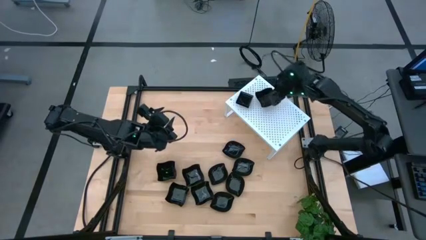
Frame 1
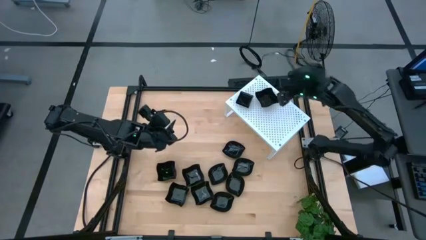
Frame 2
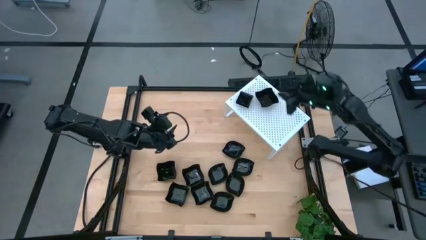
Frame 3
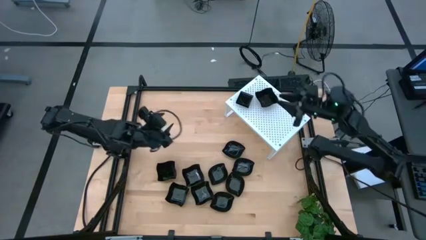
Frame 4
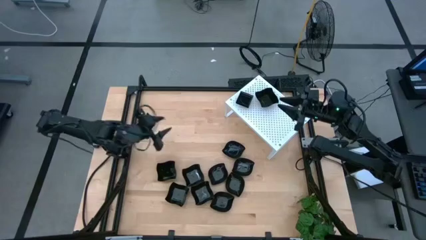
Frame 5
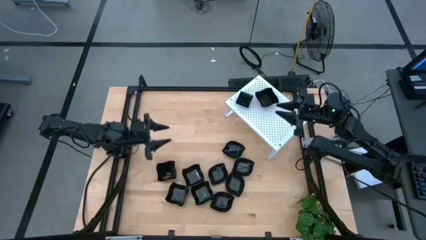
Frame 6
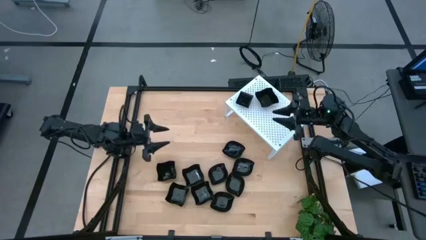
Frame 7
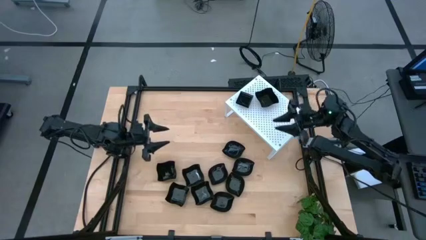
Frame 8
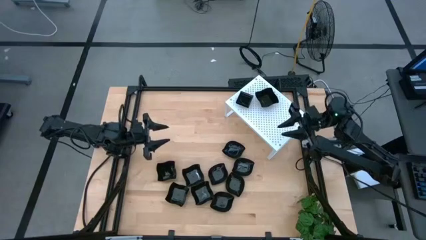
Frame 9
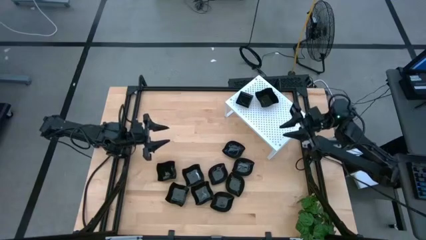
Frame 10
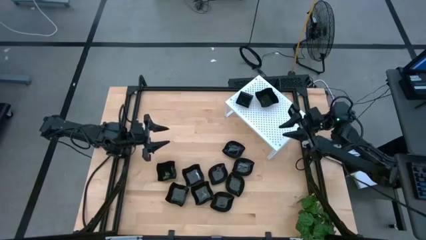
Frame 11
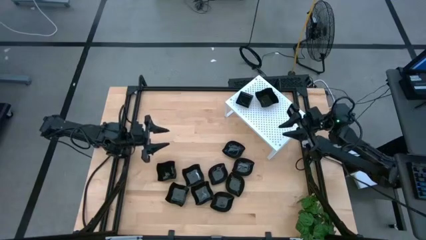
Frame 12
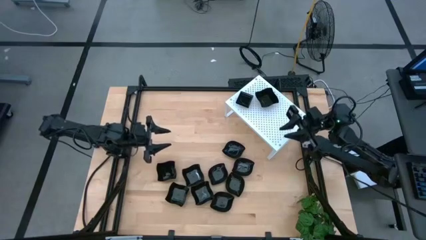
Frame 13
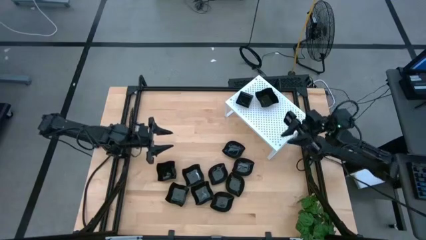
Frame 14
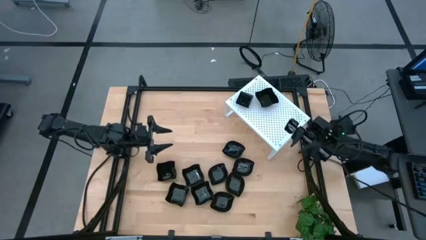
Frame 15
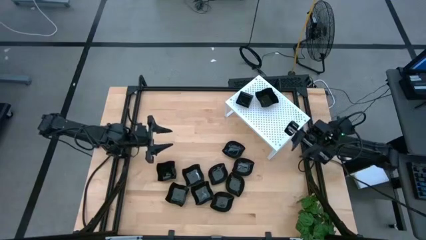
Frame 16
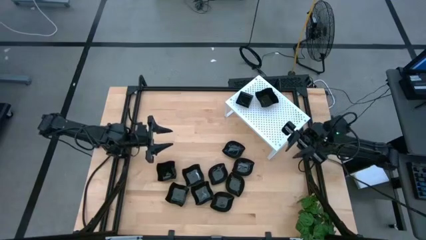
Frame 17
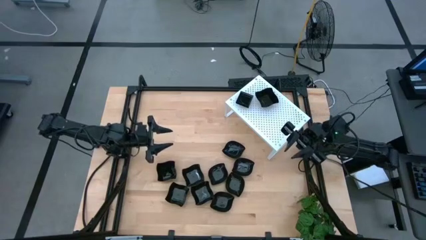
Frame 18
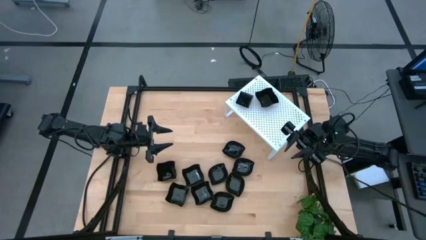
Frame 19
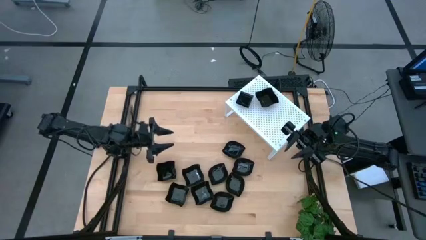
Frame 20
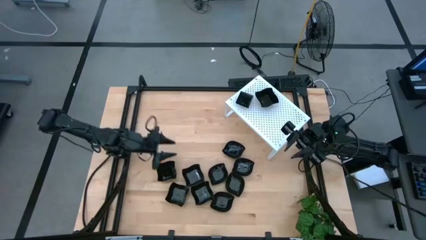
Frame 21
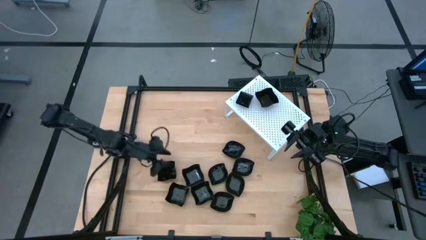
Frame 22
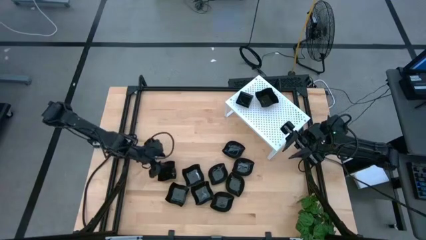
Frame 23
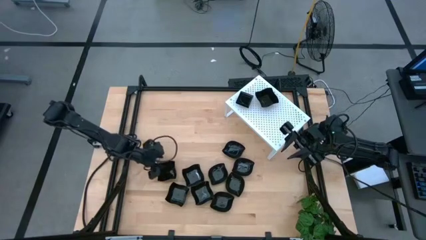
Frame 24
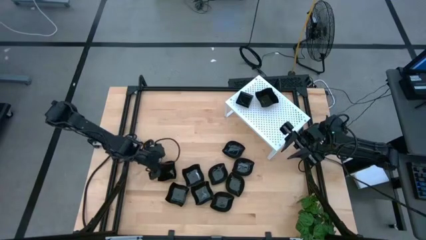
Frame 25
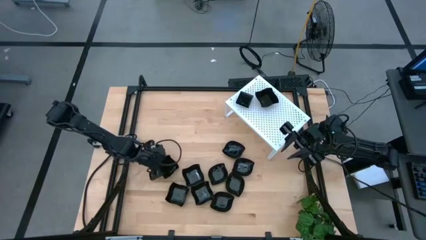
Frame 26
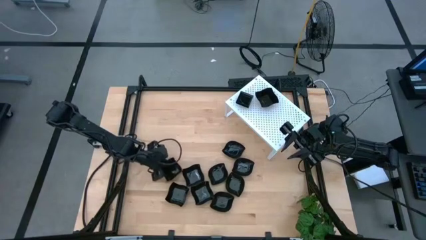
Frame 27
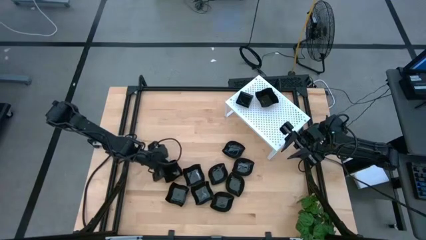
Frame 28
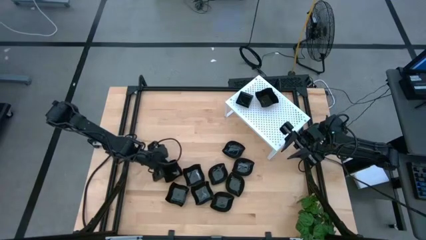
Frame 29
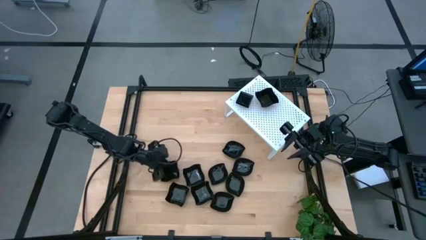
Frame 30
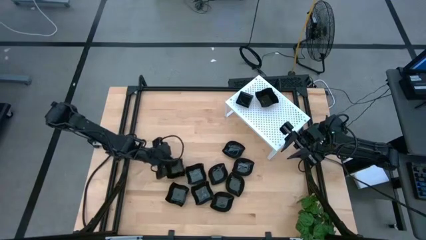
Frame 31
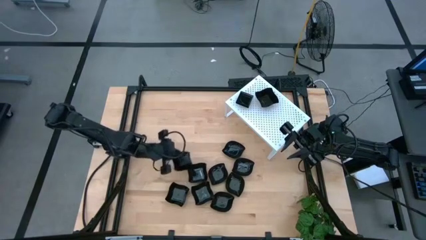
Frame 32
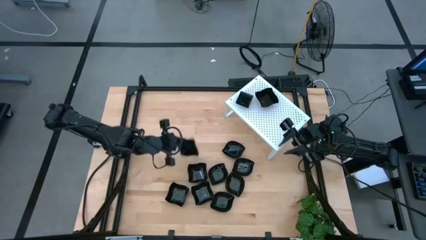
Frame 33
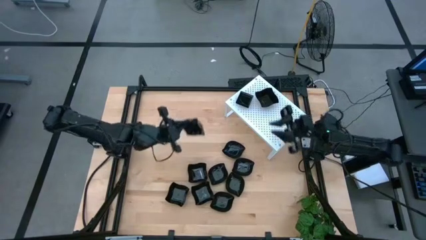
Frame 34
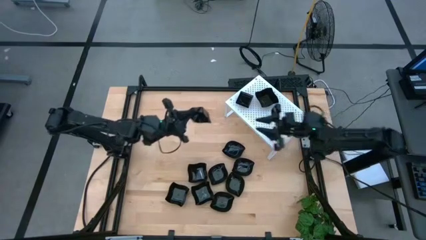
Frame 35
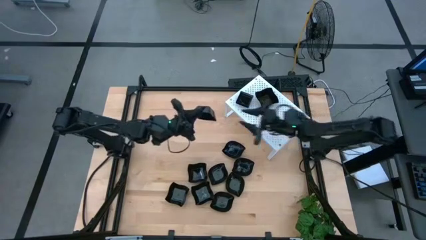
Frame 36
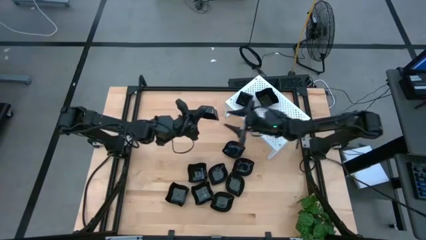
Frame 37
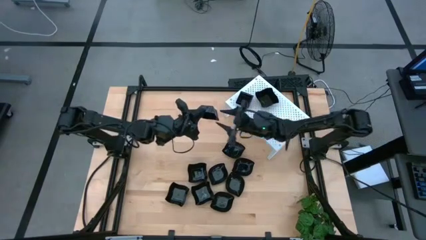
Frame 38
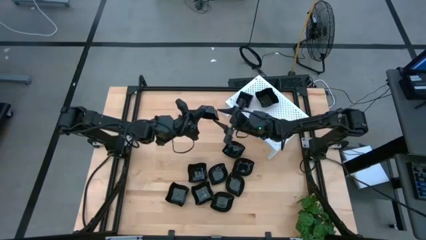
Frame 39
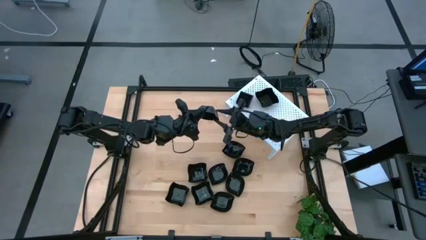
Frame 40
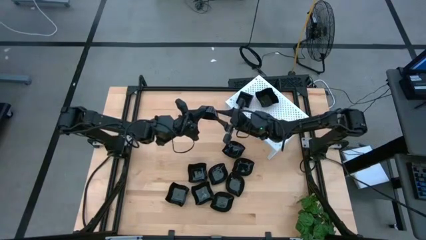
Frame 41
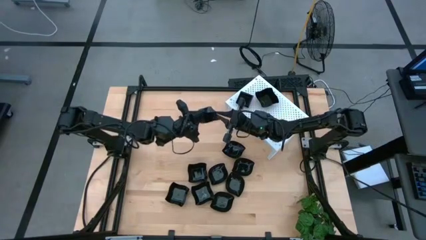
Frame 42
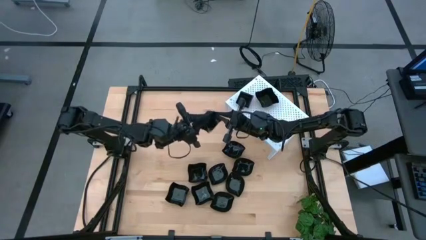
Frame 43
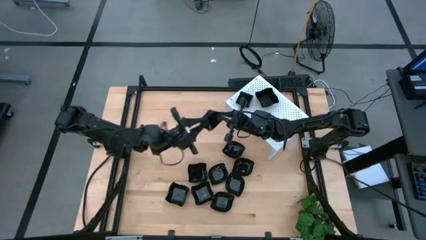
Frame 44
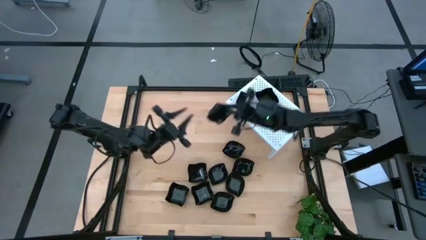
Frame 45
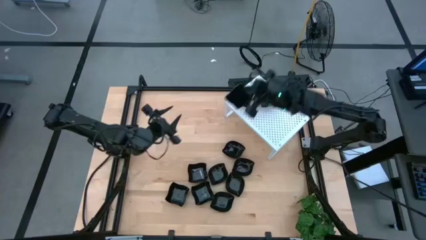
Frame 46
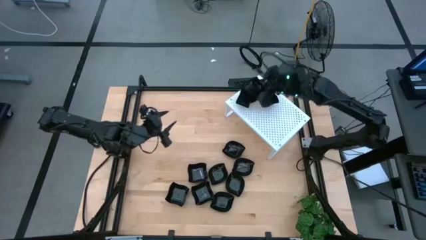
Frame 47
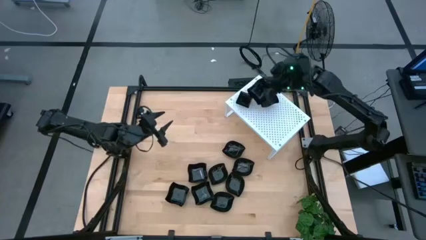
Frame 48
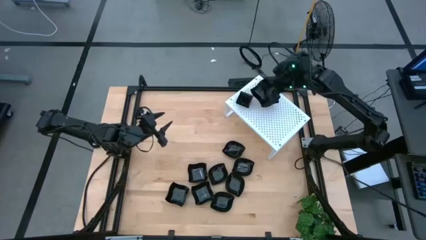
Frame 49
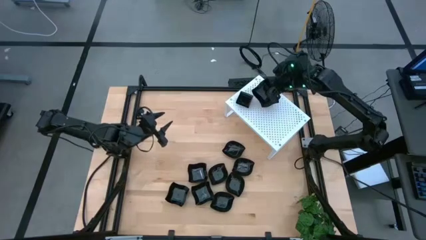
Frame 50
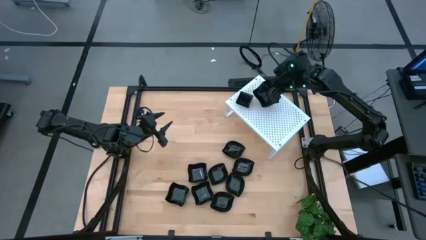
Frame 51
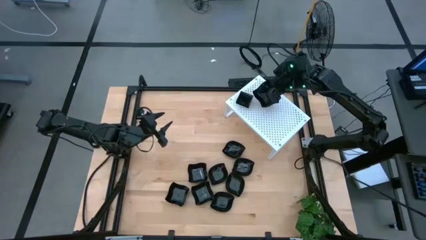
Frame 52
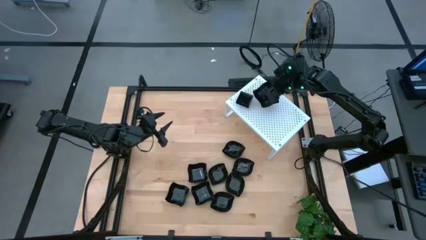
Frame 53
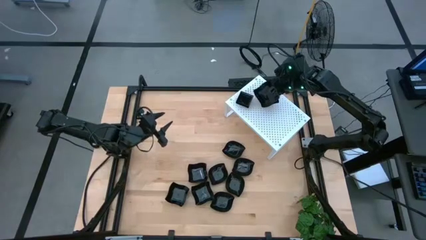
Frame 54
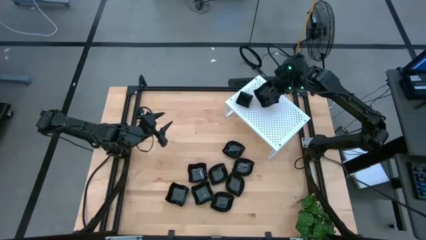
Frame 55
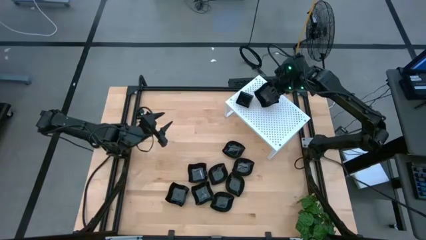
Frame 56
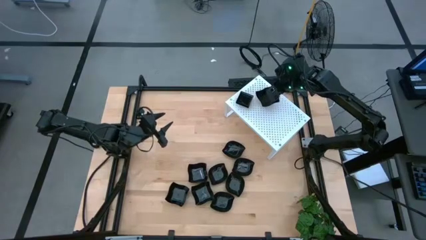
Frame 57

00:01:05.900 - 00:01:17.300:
Task: Pick & Place Mini shaped plates
Stack the distorted square plate on top of the other distorted square plate on the shelf

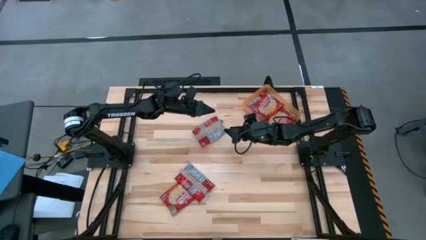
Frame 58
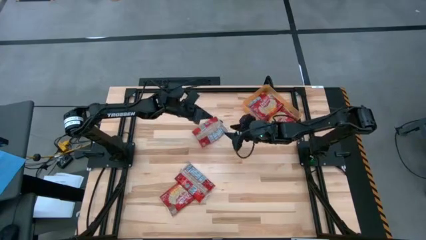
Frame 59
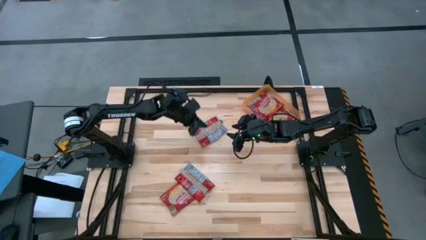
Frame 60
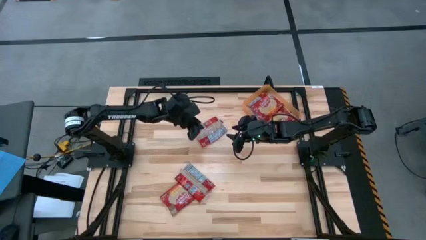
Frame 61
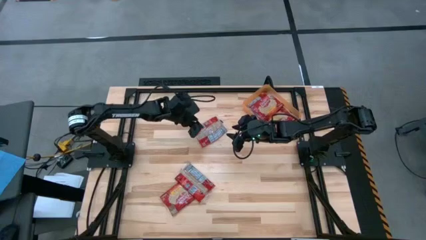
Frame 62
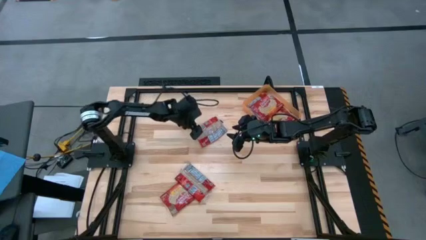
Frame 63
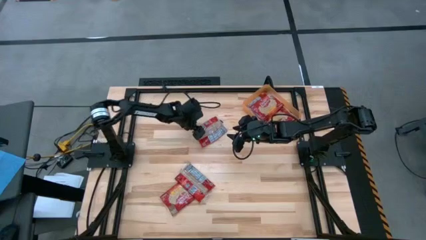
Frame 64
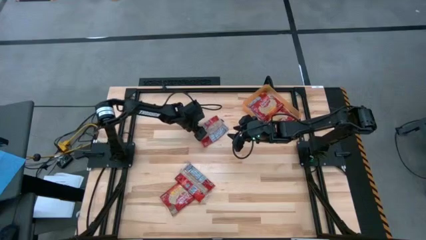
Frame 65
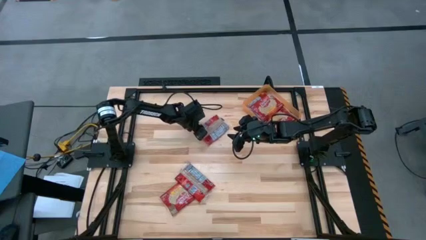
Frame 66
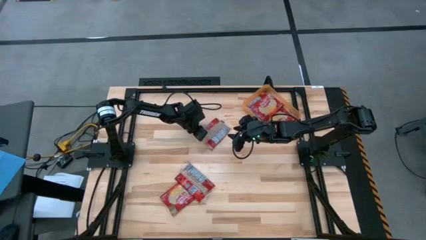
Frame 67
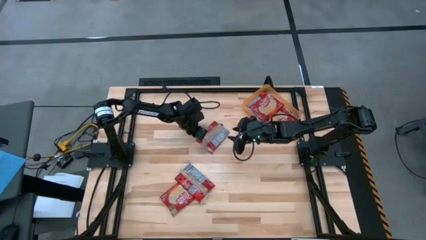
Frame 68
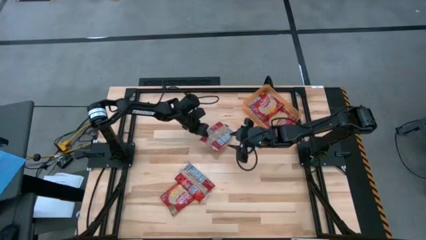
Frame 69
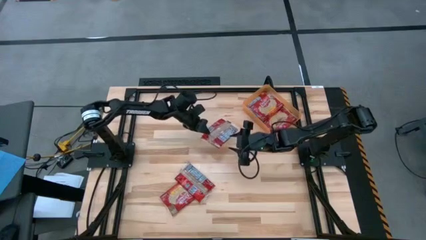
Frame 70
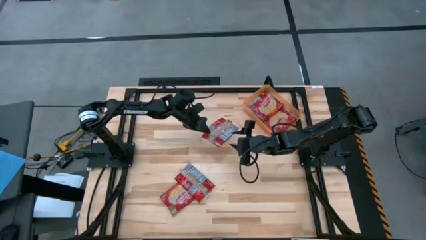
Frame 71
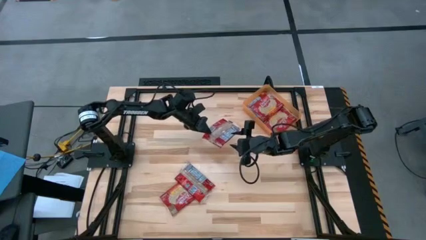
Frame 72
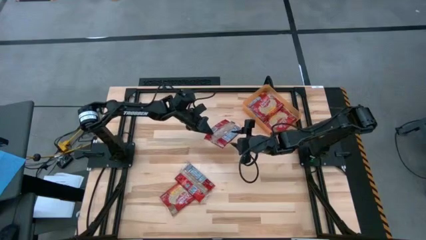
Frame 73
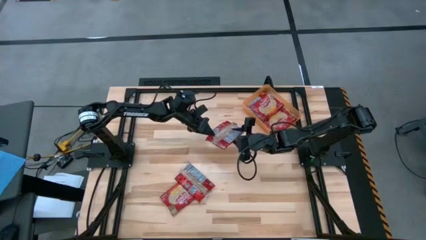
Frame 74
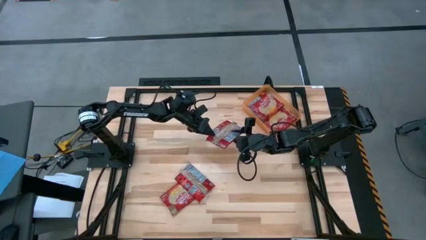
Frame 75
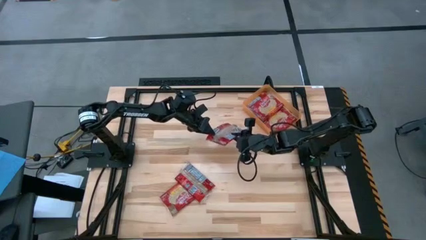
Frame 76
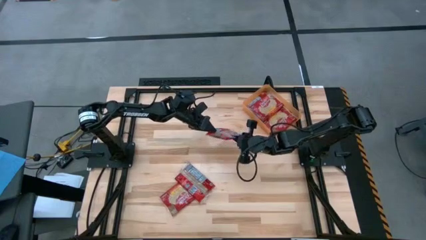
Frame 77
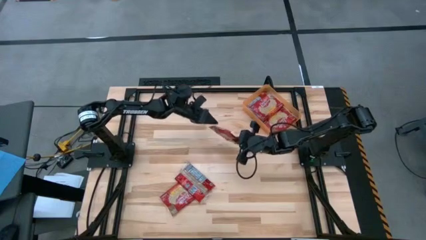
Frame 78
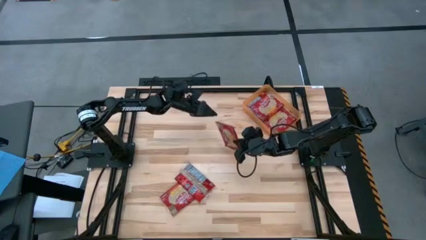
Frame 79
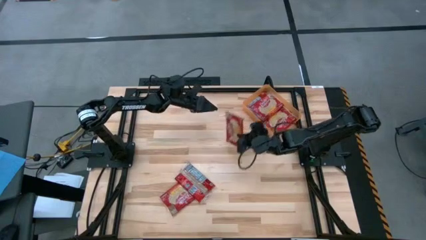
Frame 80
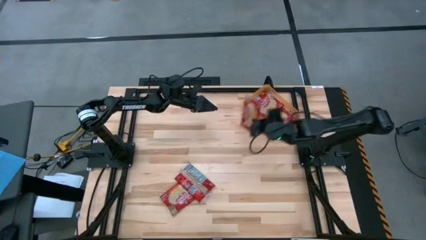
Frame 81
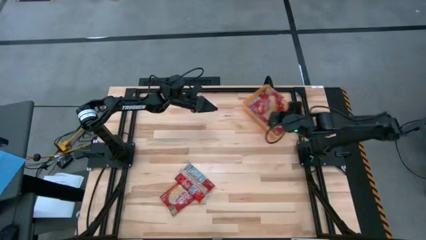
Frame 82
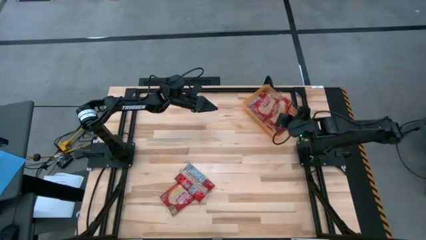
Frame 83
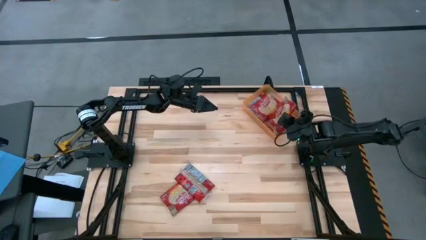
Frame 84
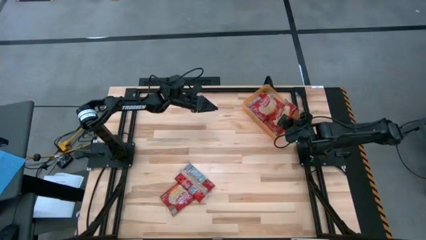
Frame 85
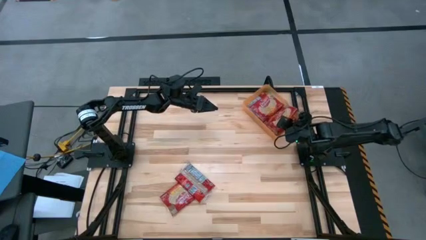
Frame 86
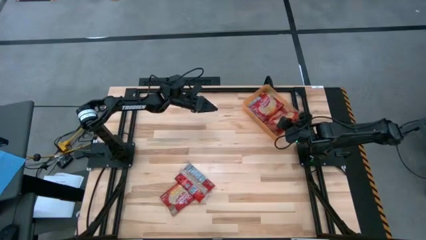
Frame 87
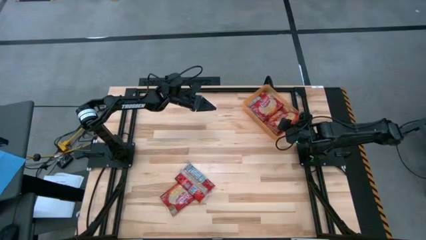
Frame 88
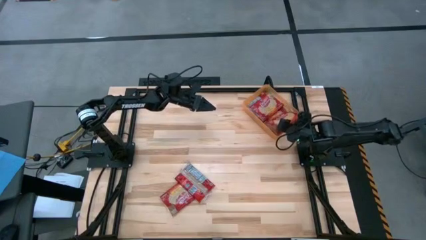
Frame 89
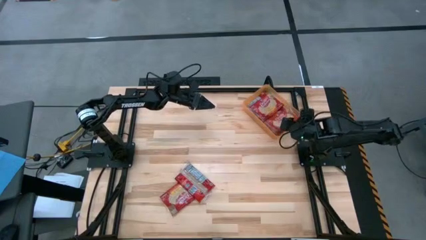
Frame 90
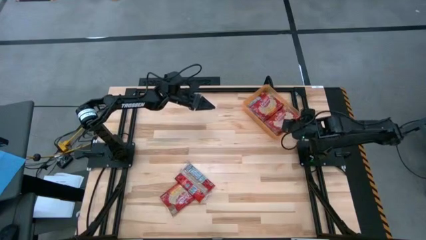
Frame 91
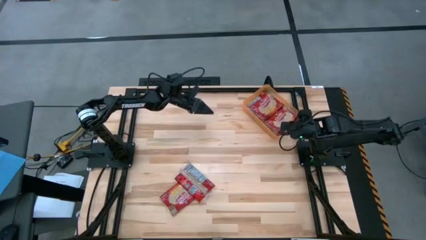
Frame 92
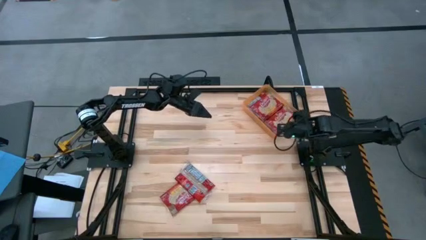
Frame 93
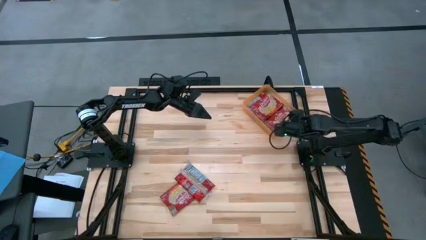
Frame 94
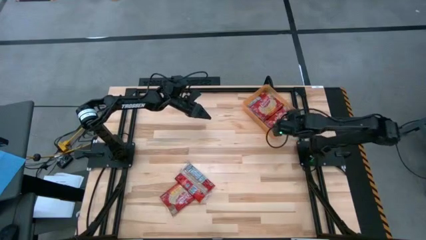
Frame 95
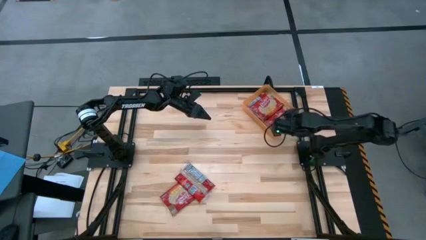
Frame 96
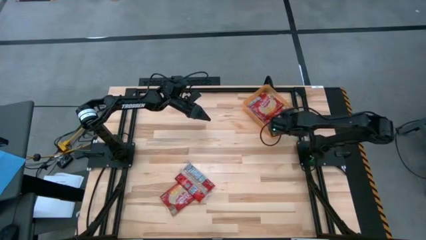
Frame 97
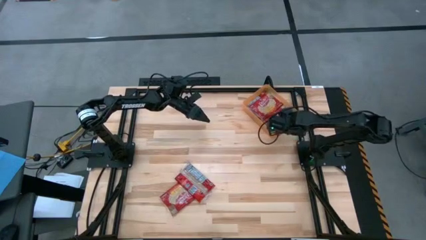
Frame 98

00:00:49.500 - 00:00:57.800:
Task: Sort popcorn bags into baskets
Put the red popcorn bag into the orange bin
